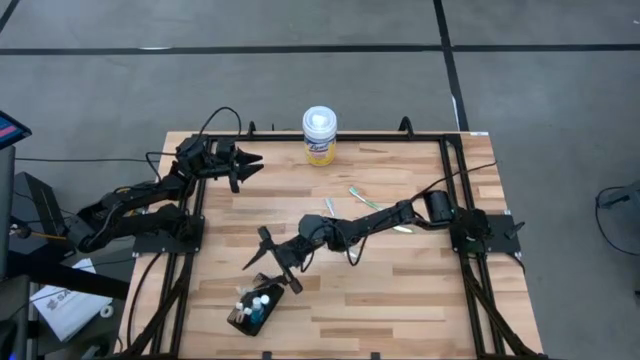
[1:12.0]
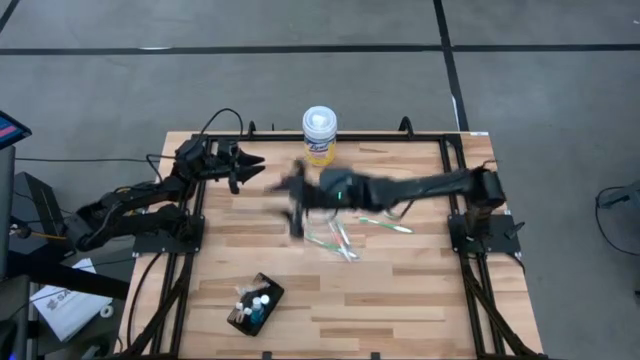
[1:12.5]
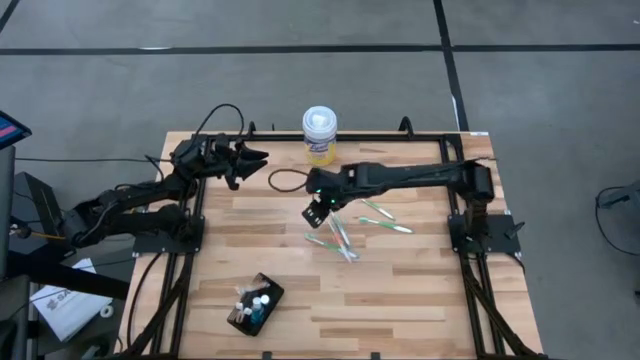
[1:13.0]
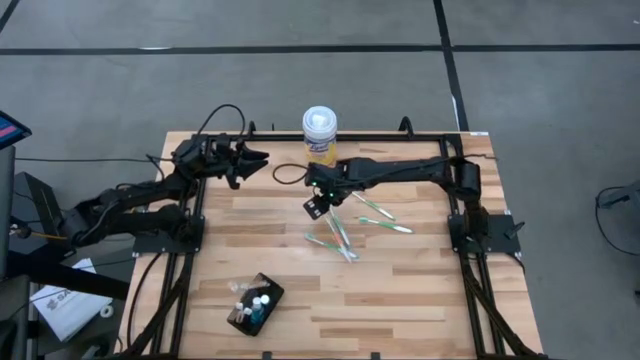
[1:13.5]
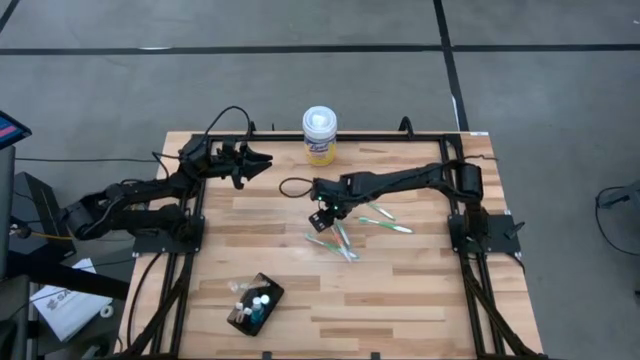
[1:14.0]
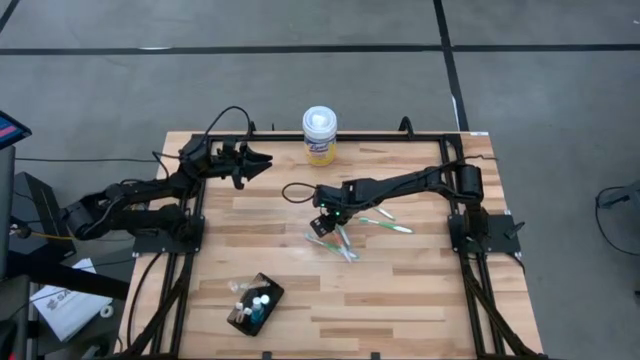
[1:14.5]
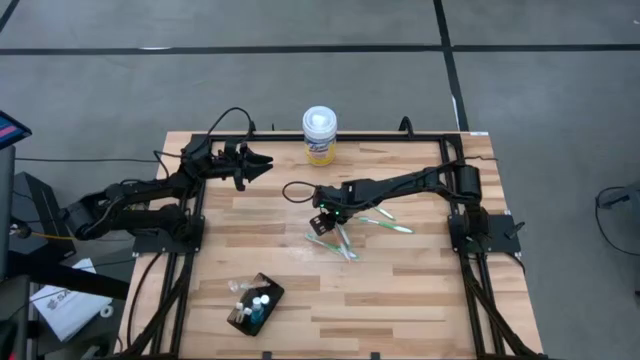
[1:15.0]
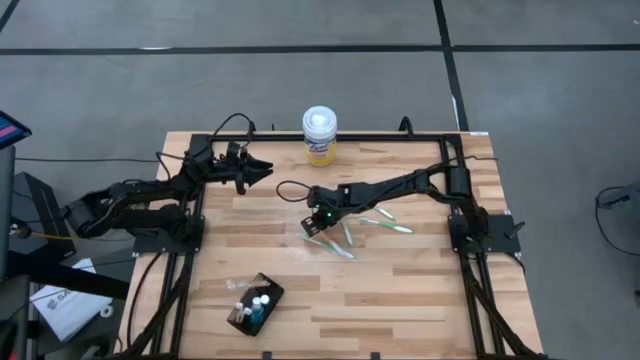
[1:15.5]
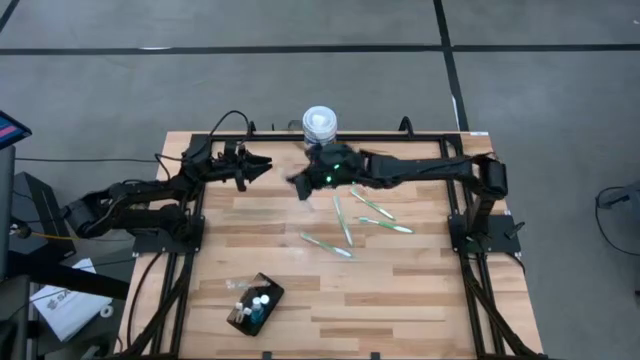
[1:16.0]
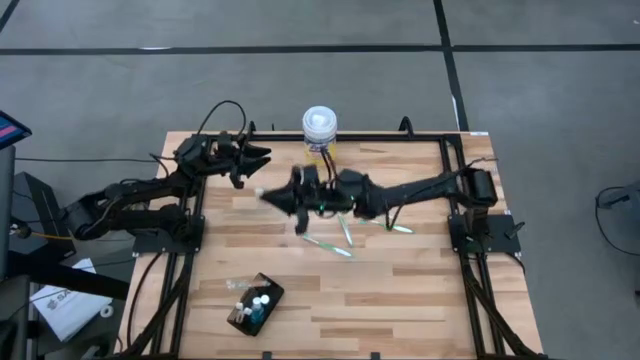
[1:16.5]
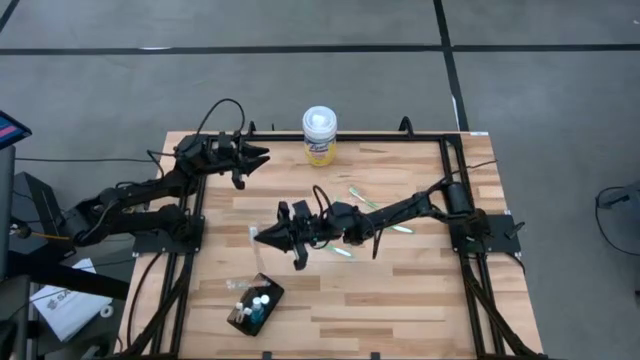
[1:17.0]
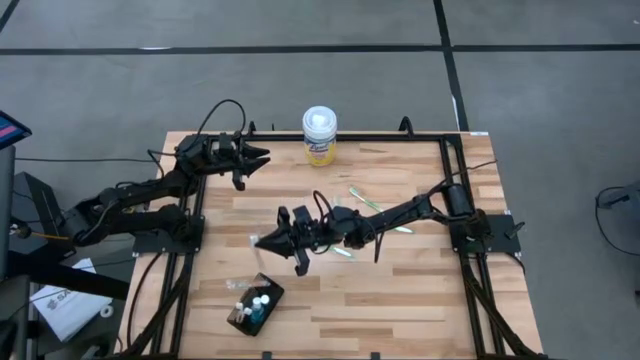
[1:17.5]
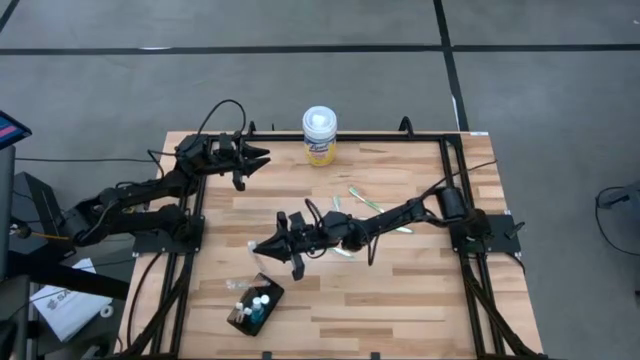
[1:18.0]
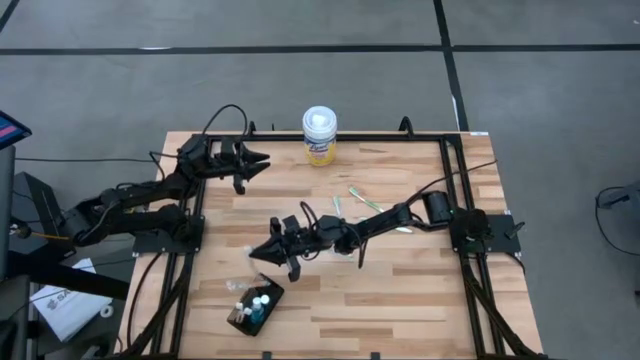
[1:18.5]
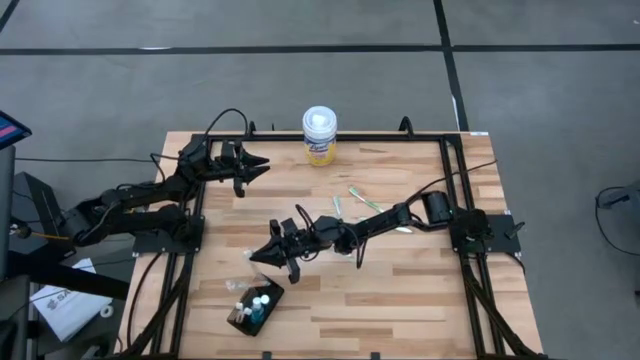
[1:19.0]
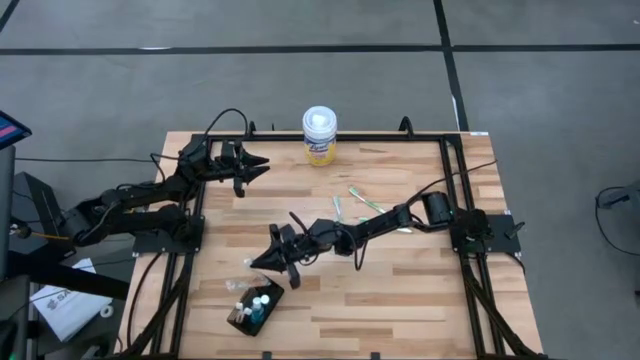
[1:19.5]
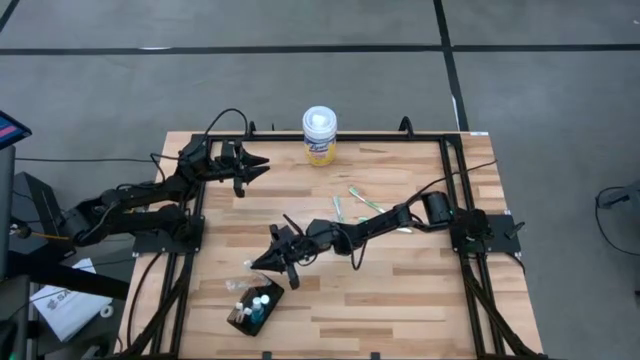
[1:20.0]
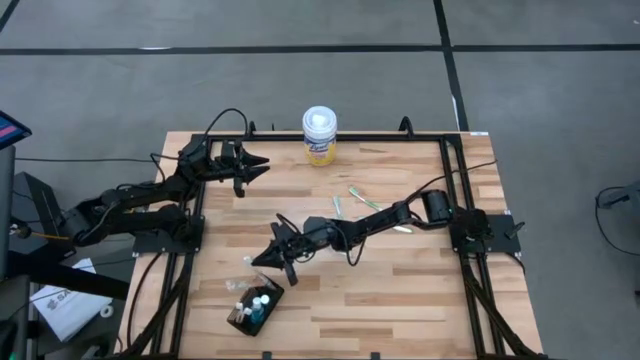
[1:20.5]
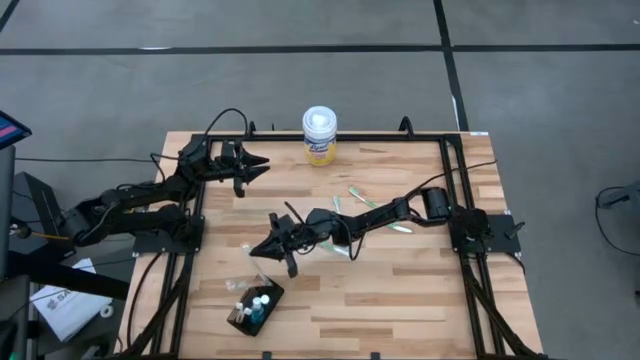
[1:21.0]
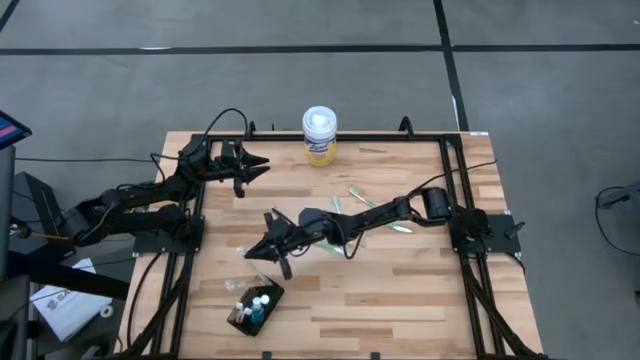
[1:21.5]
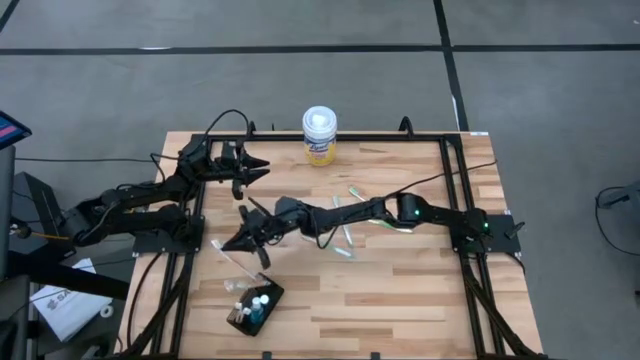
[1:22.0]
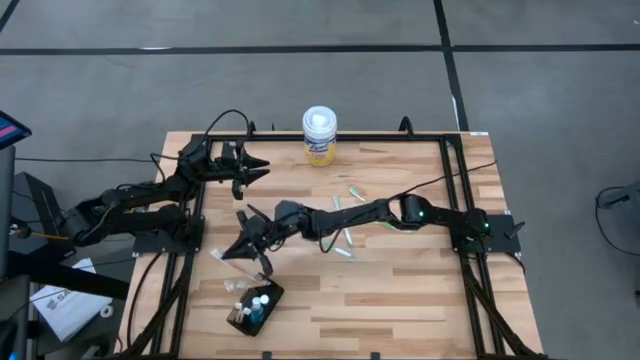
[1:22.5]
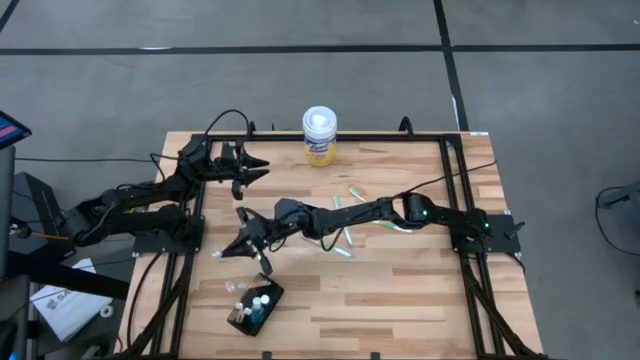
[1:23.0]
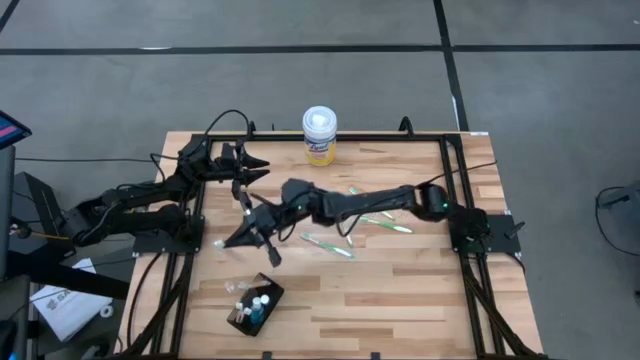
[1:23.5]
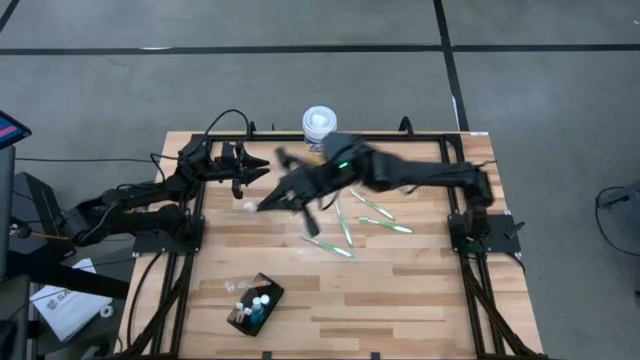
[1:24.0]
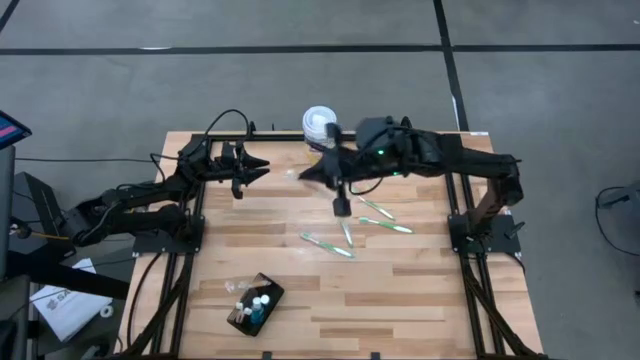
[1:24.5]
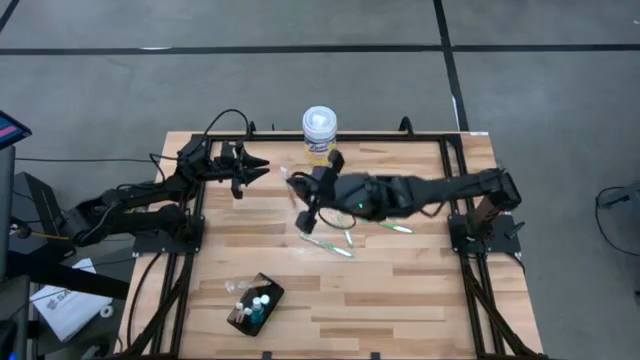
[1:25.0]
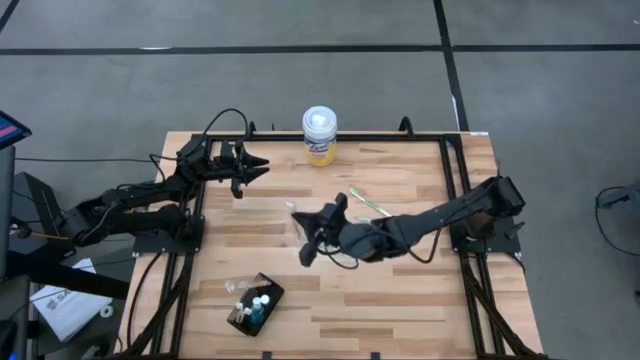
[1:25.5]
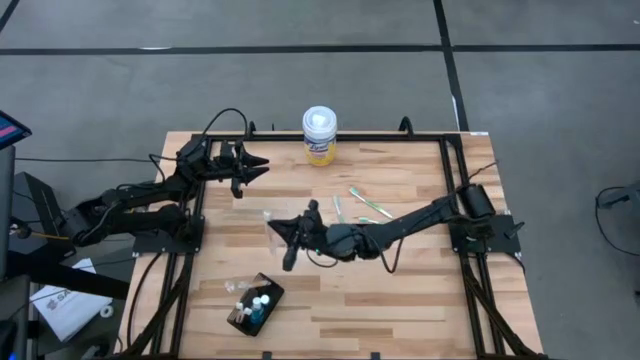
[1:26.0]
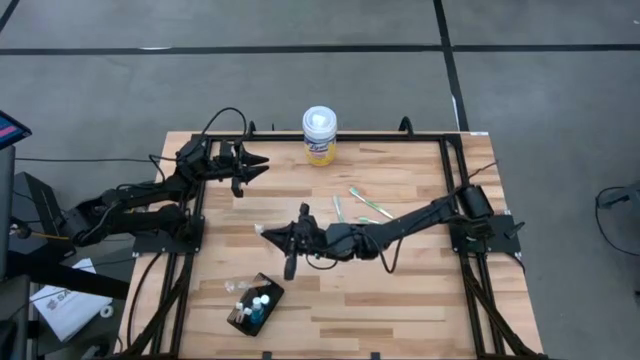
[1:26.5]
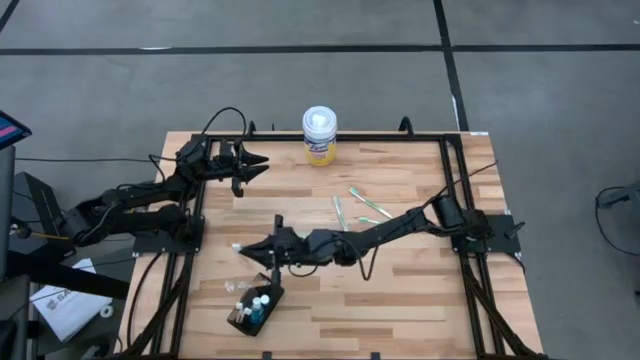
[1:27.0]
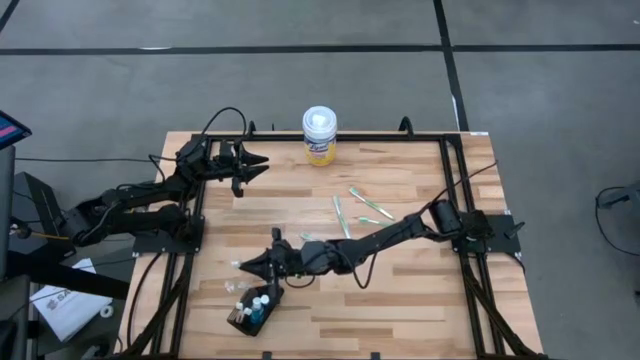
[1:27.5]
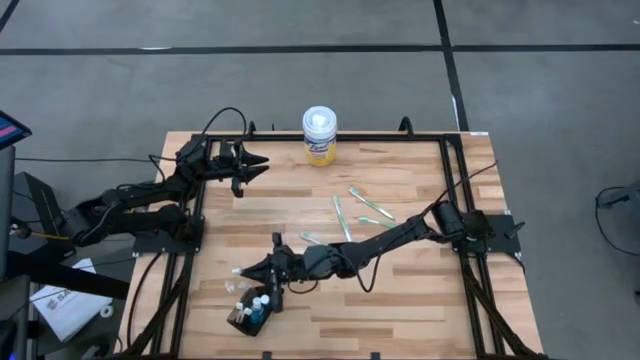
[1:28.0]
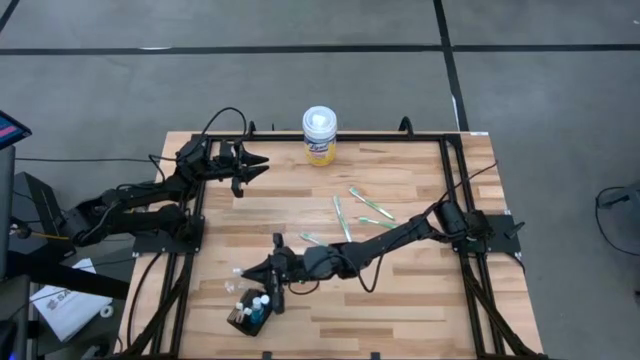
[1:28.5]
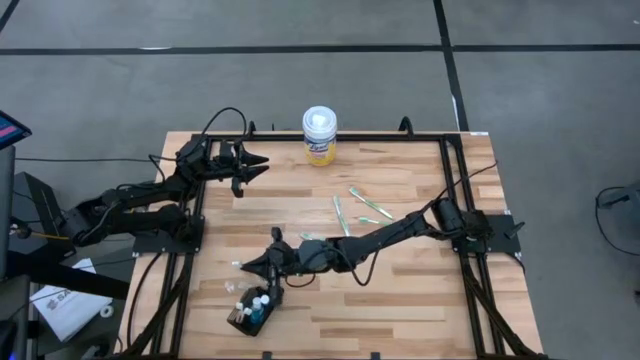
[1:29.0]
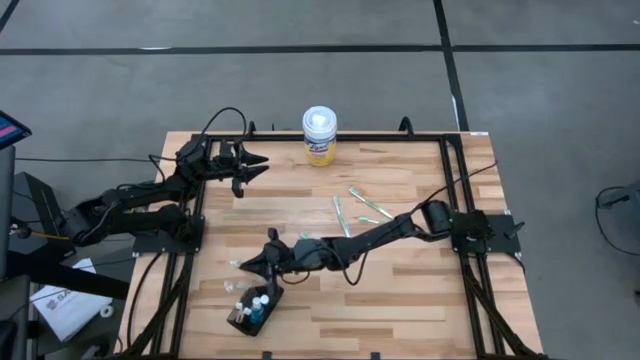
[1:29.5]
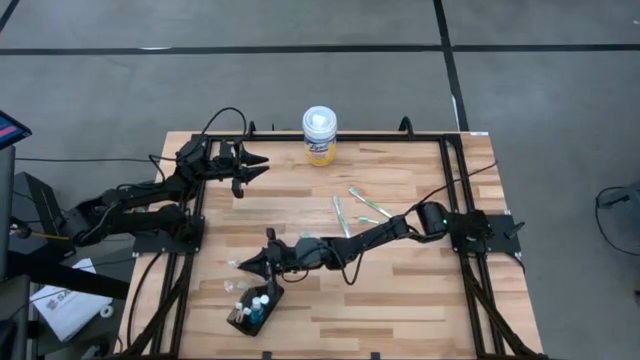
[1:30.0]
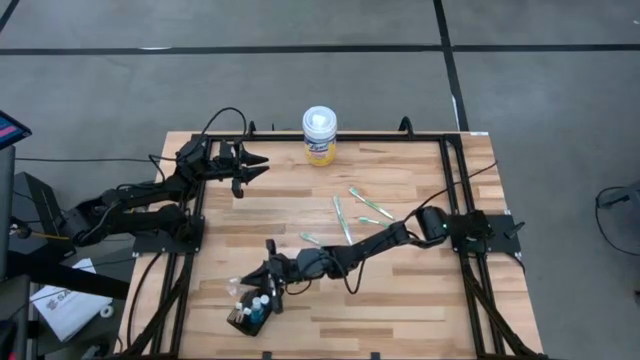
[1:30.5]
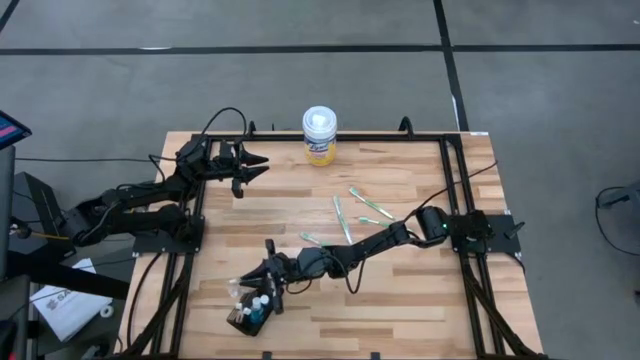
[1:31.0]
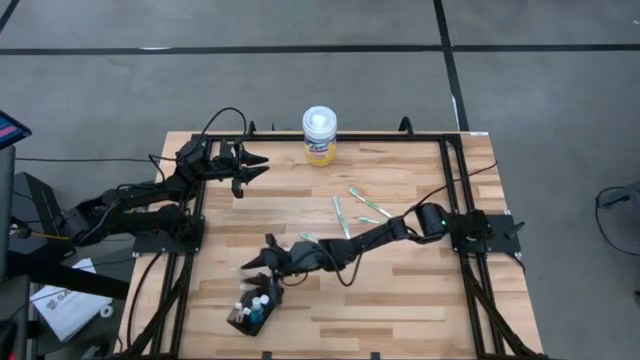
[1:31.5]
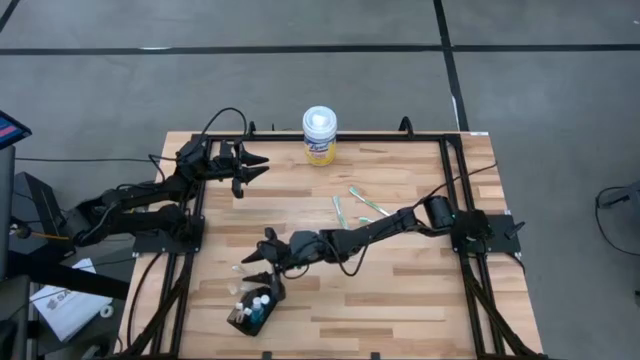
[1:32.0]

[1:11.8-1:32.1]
Task: Pick & Place toothbrushing station
Put the orange toothbrush into the black wire organizer bin

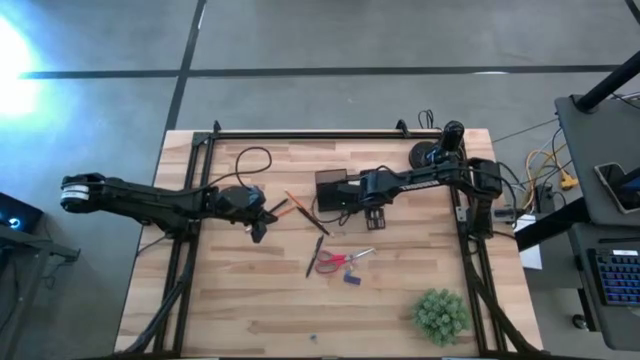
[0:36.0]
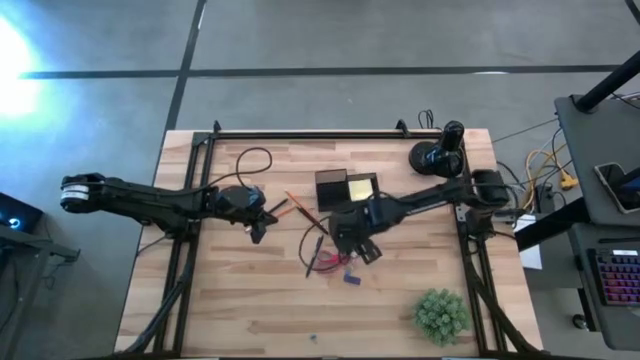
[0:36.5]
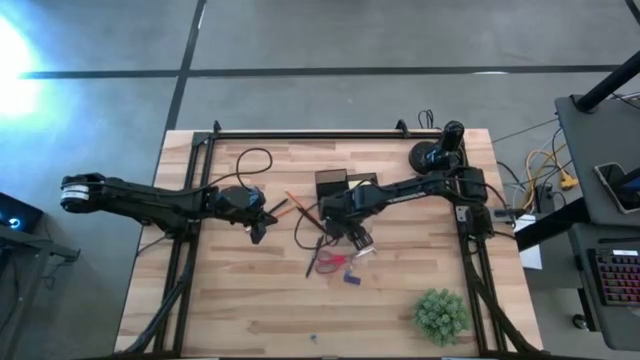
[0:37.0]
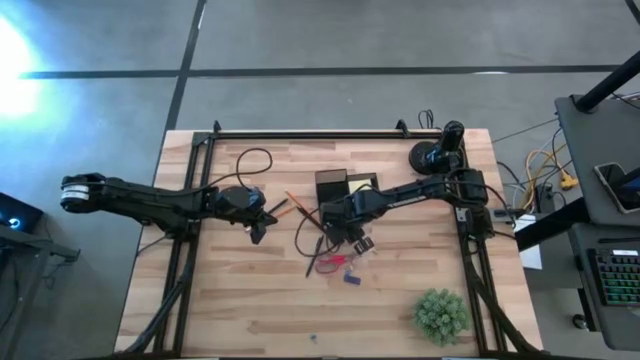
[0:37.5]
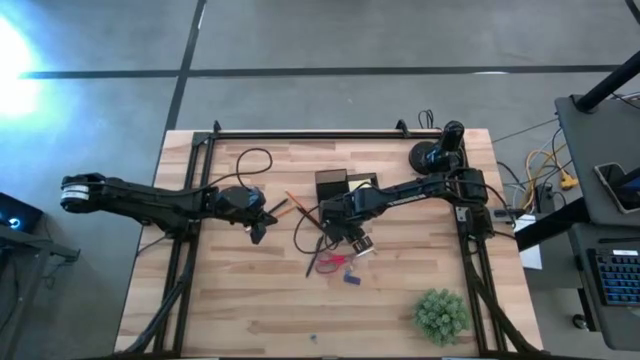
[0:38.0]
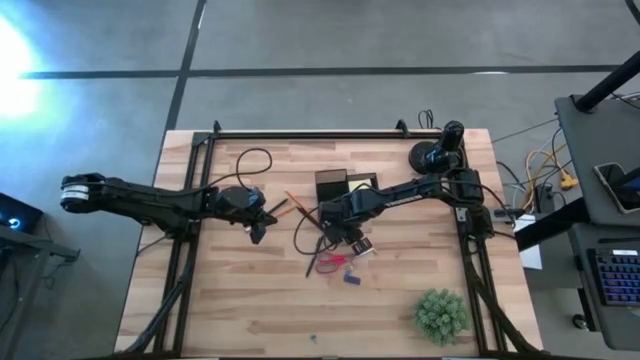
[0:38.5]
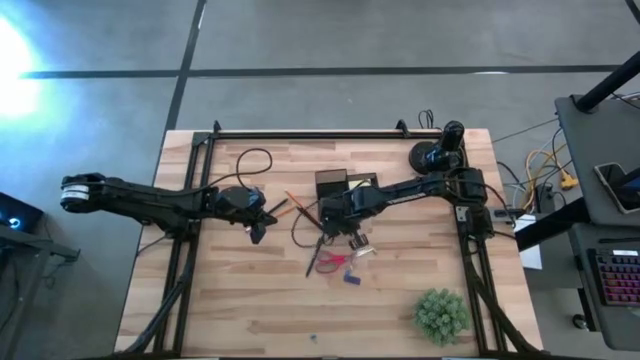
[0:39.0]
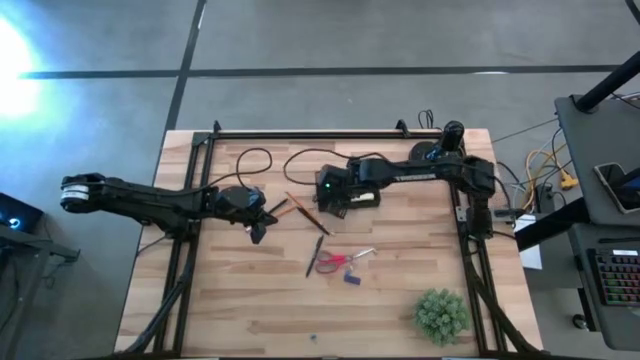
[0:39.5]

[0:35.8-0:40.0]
Task: Pick and place office supplies into organizer
Put the top blue binder clip into the desk organizer
